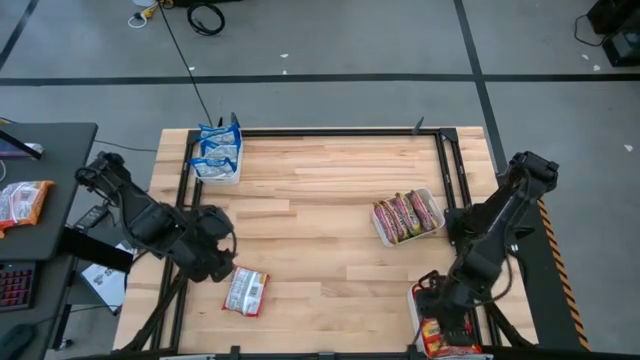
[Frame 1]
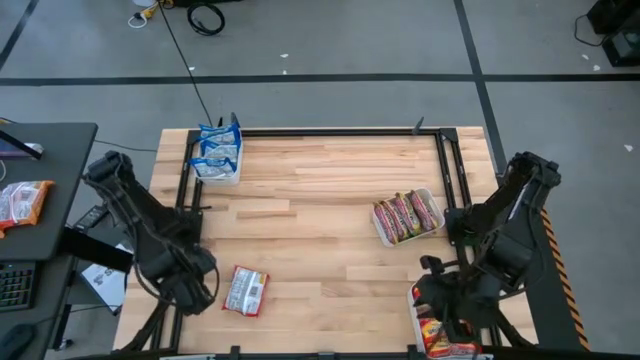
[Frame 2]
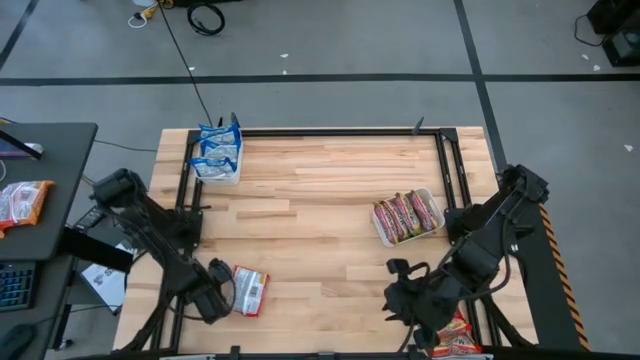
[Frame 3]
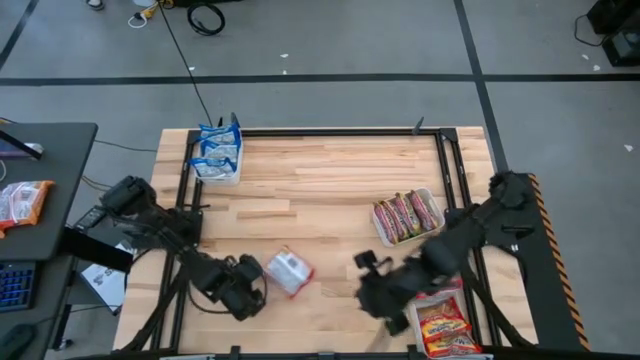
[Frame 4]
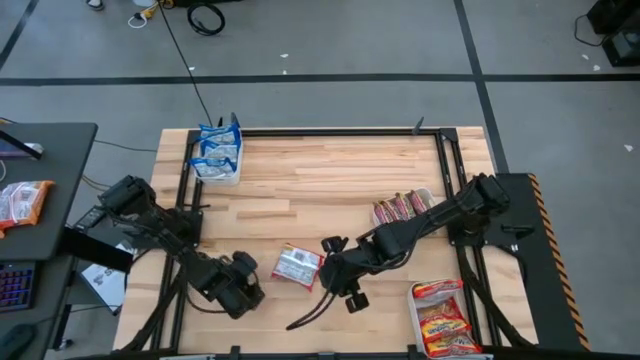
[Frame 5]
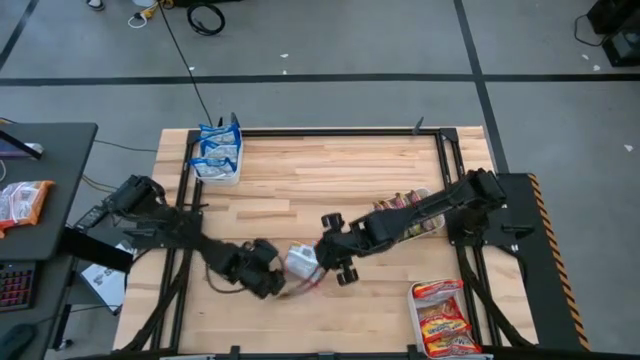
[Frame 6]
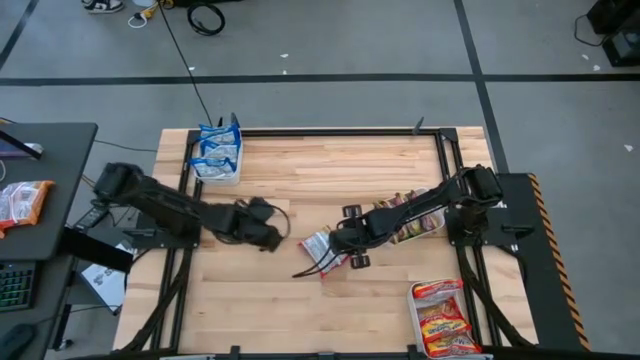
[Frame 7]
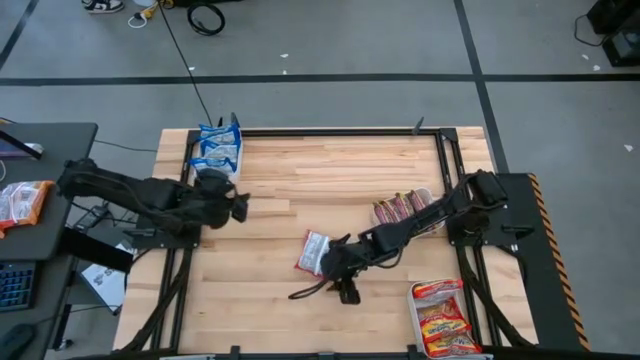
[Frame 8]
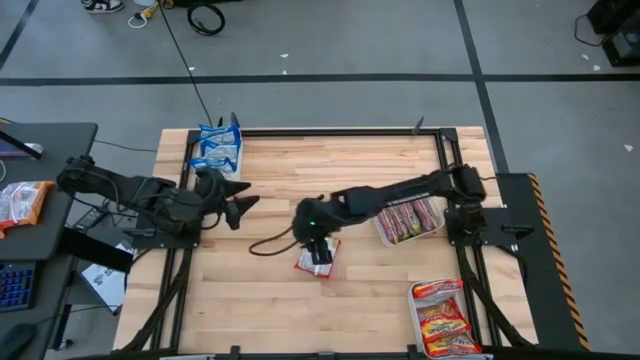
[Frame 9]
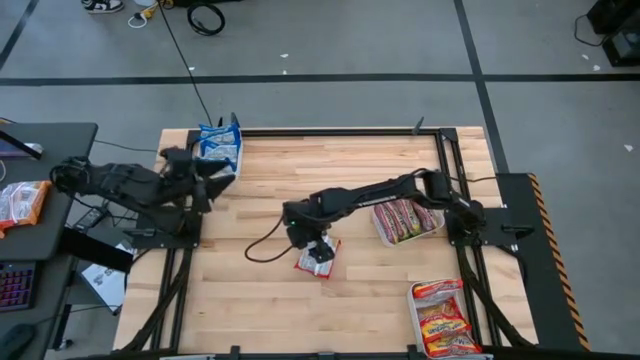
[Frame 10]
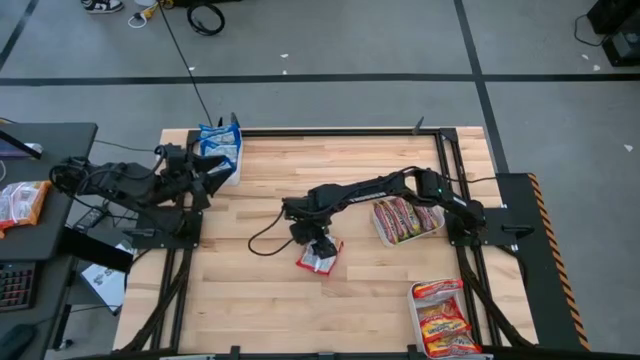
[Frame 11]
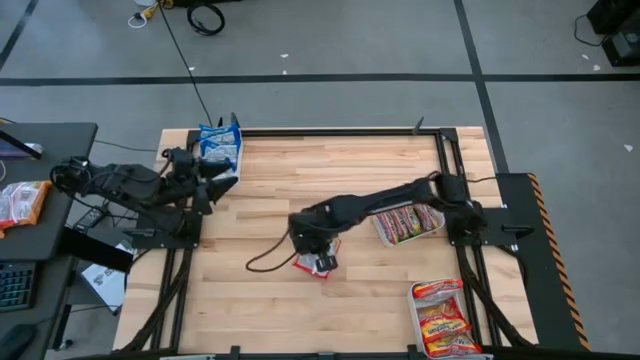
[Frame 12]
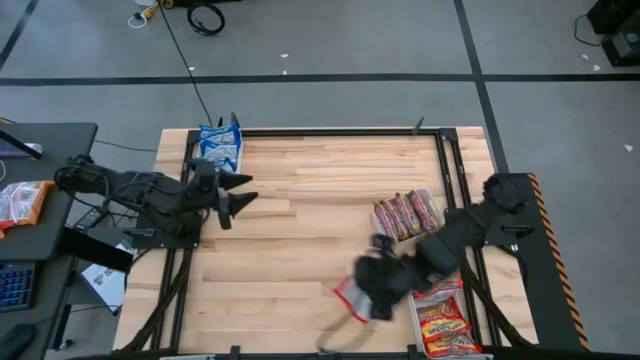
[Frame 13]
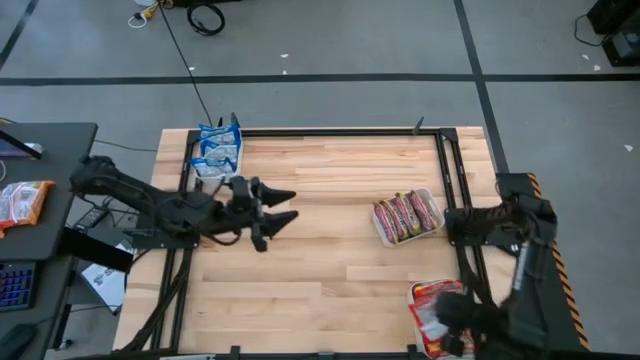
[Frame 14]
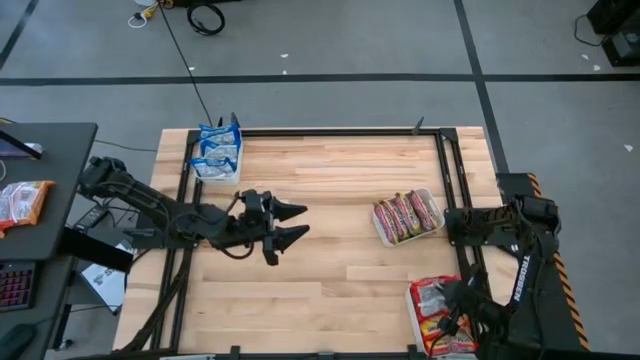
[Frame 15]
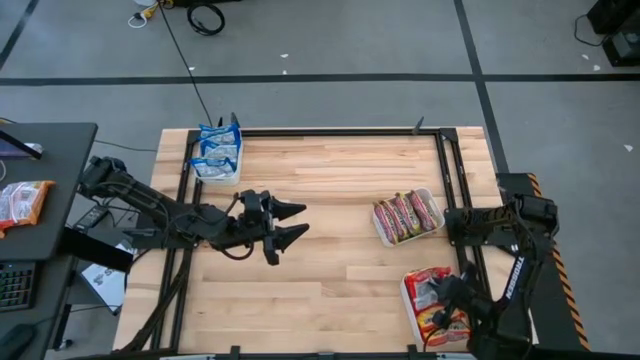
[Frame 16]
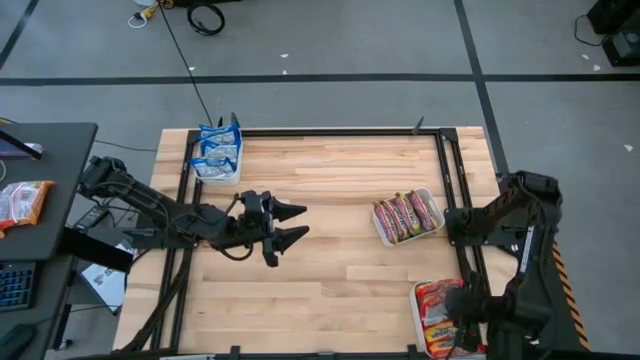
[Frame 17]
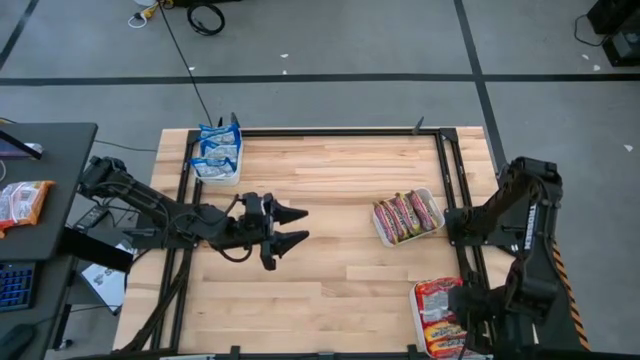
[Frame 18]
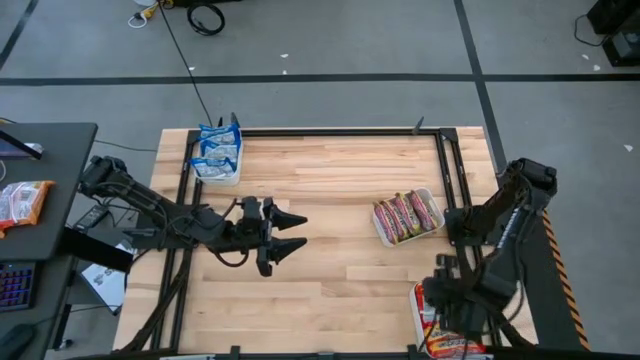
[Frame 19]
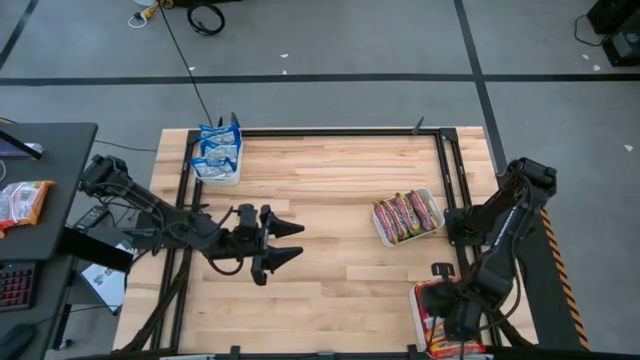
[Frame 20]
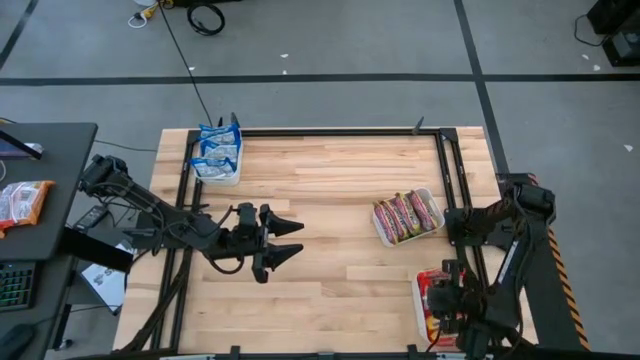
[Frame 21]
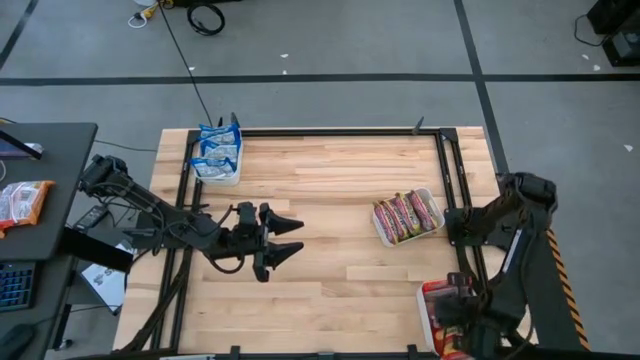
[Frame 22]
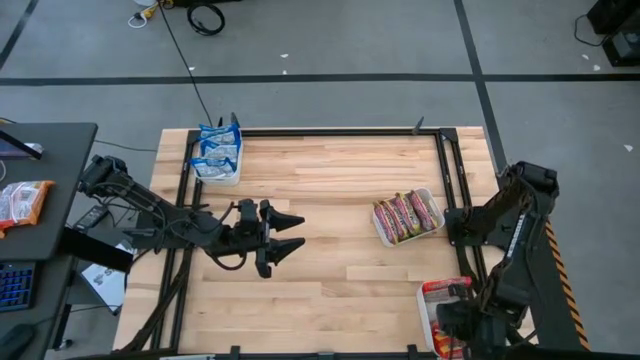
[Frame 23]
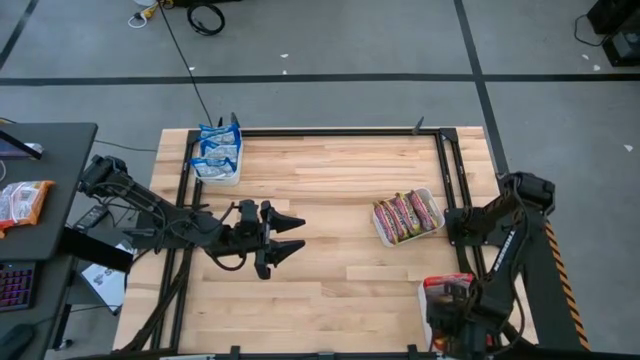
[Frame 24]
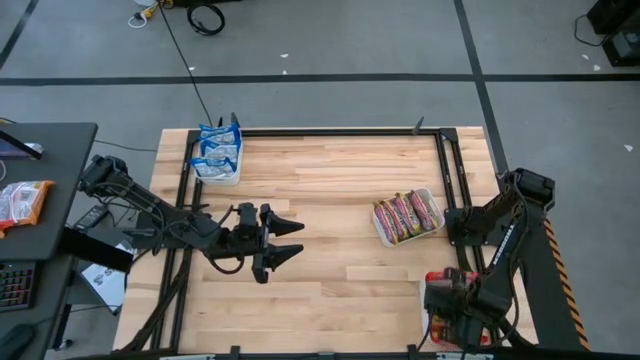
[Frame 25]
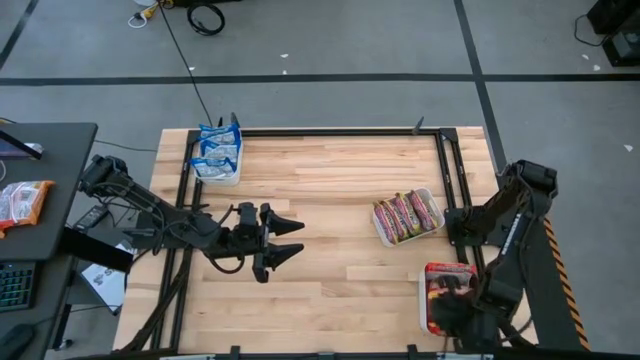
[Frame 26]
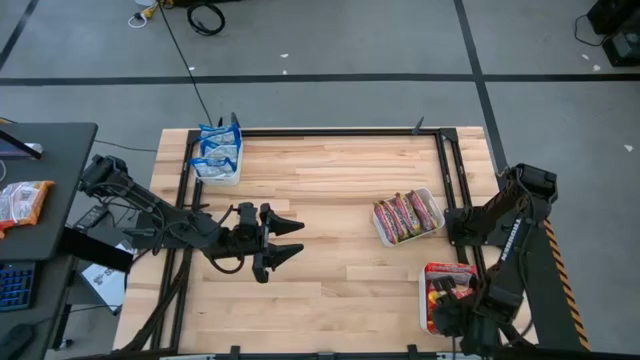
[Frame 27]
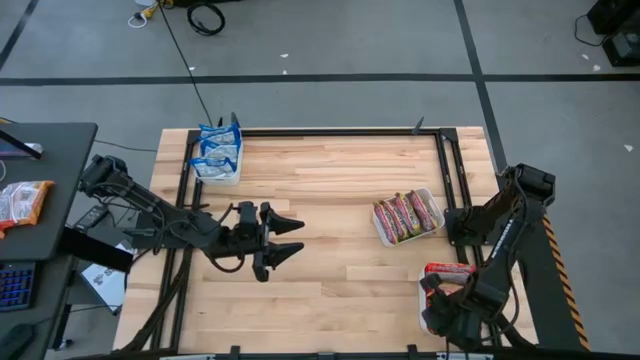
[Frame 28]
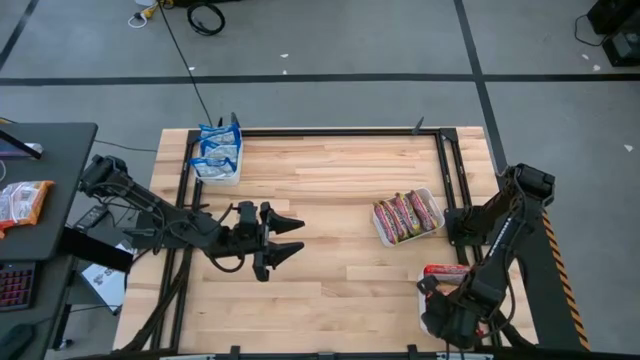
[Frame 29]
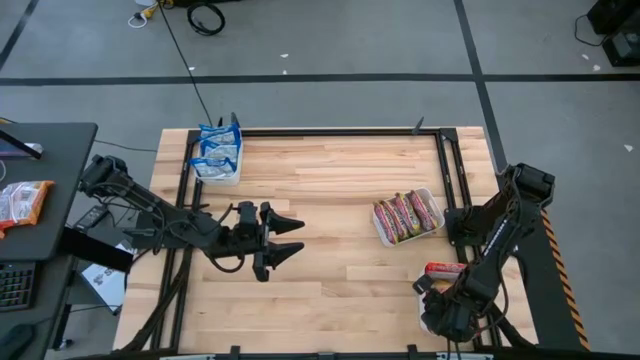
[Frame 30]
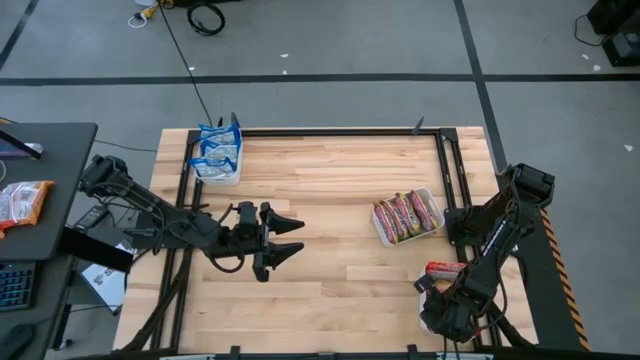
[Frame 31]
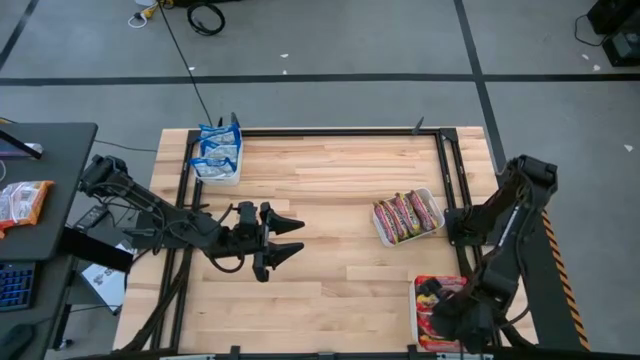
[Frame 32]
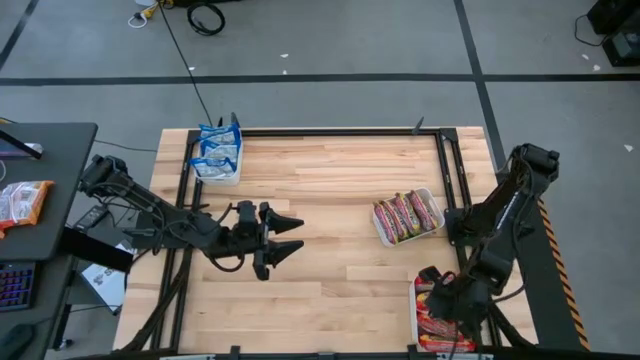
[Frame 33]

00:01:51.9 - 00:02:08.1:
Task: Sort Maruchan noodles
Put the orange noodle pack into the bottom white bin

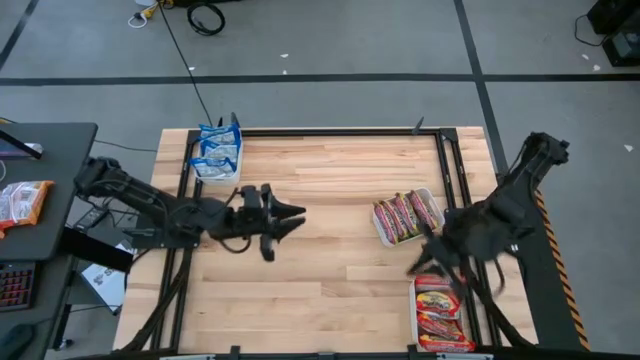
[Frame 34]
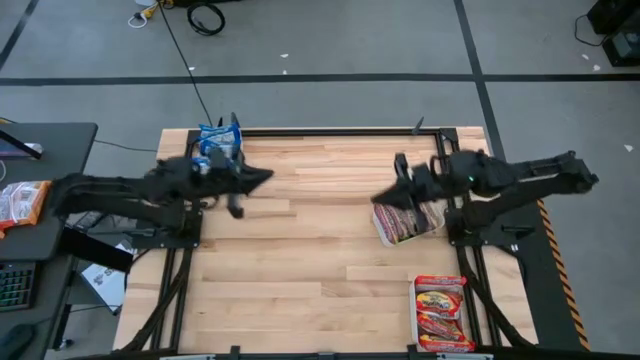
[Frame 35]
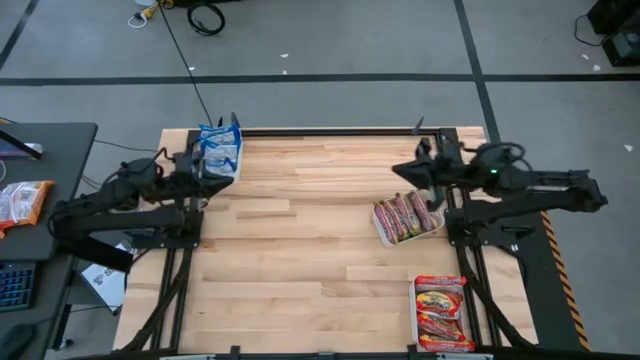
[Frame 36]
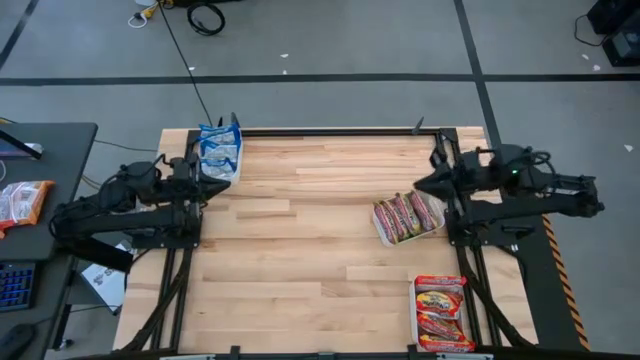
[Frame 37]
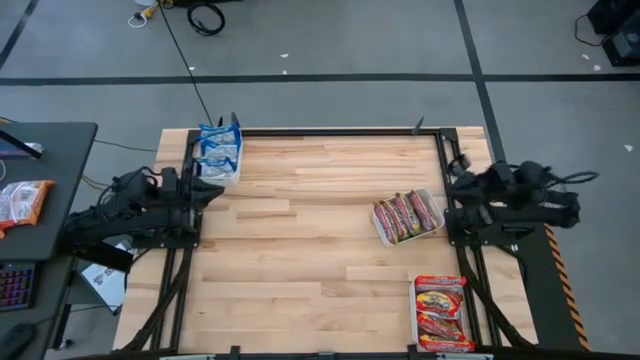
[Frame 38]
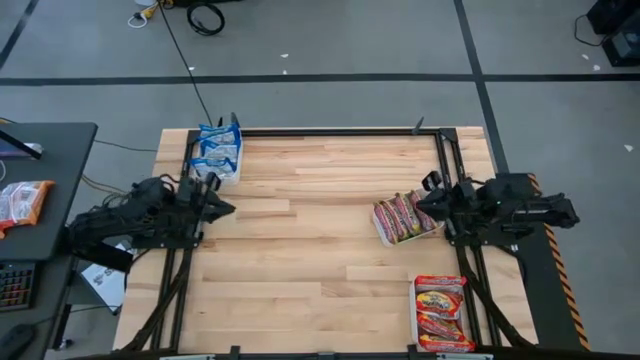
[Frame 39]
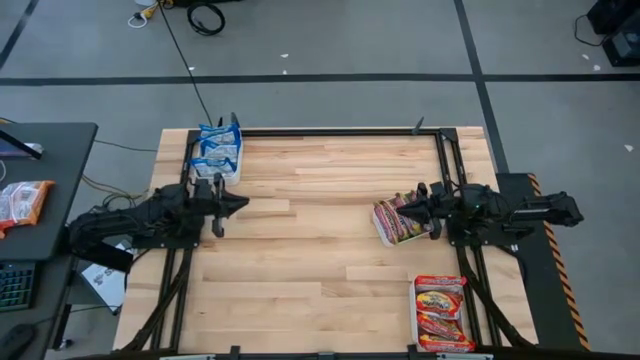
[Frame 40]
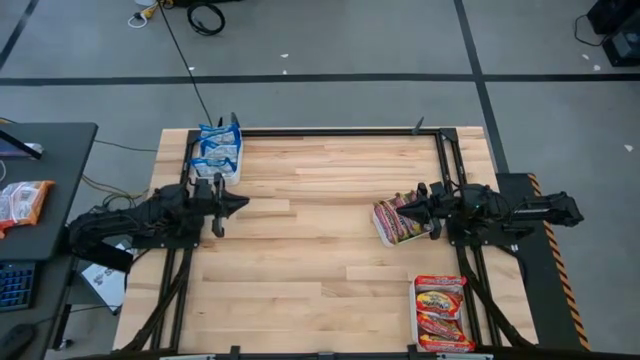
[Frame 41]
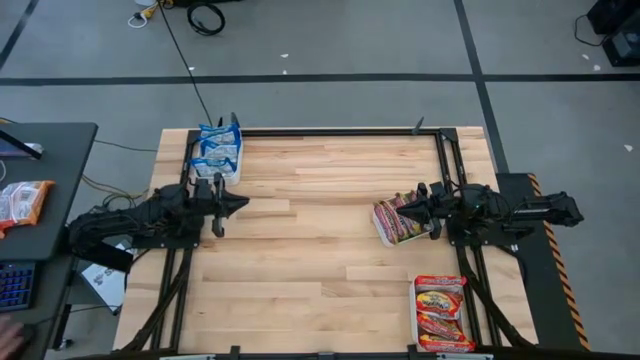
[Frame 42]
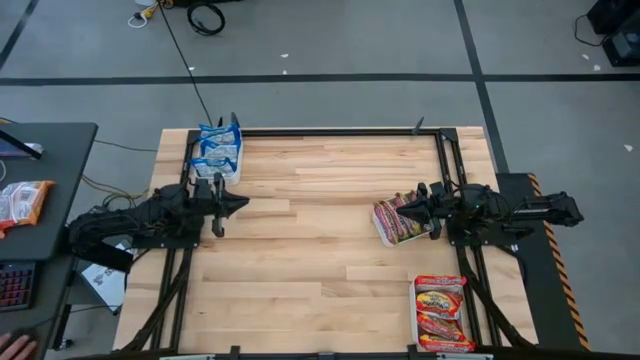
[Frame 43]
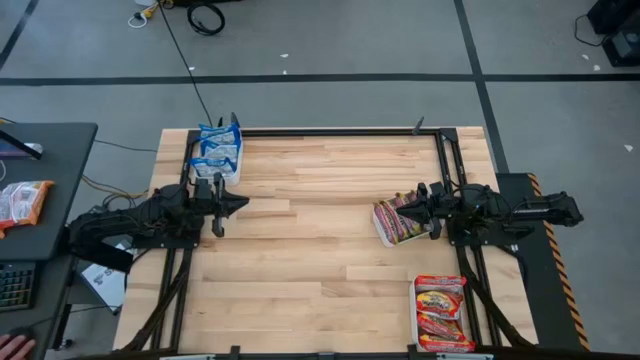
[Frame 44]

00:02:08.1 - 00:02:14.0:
Return to Home Position
